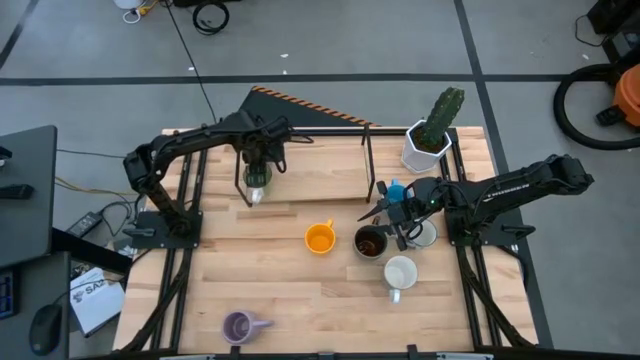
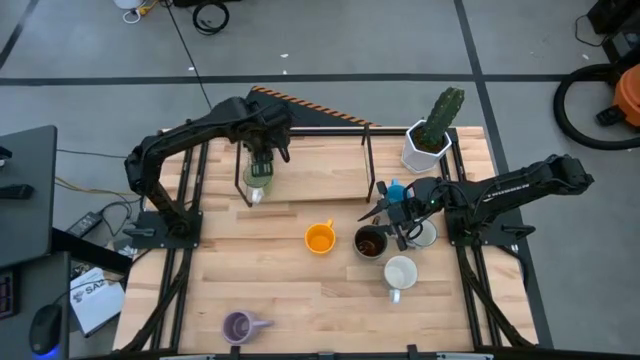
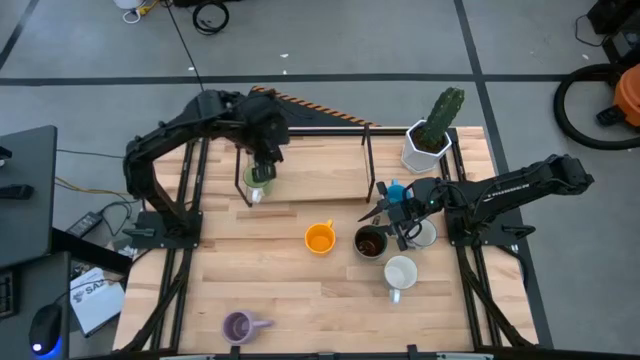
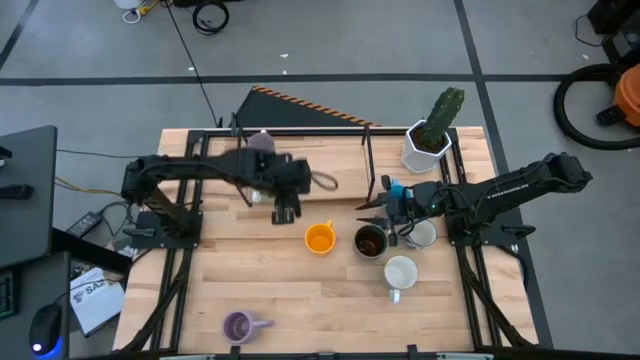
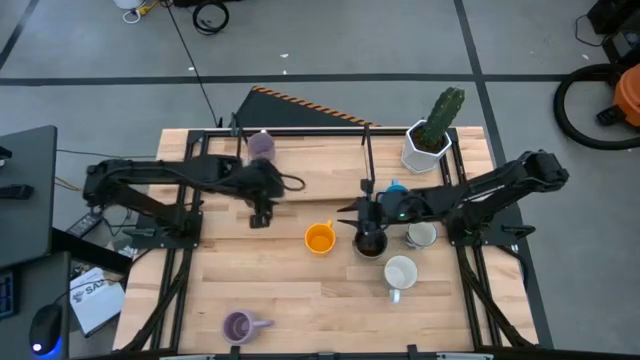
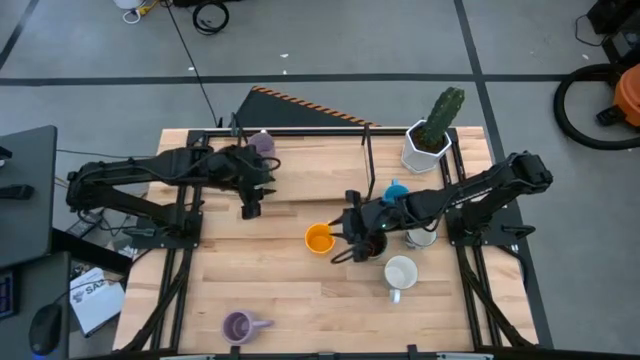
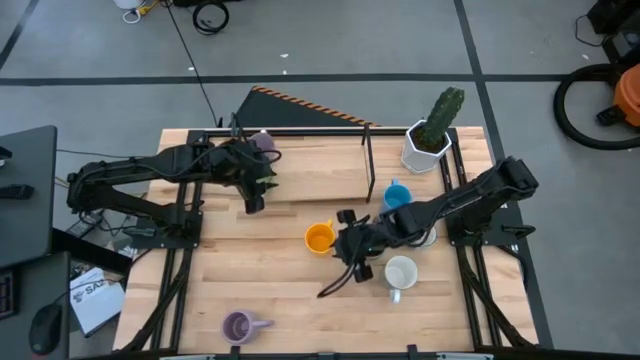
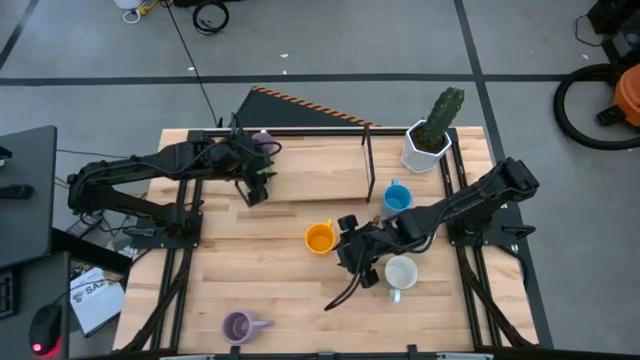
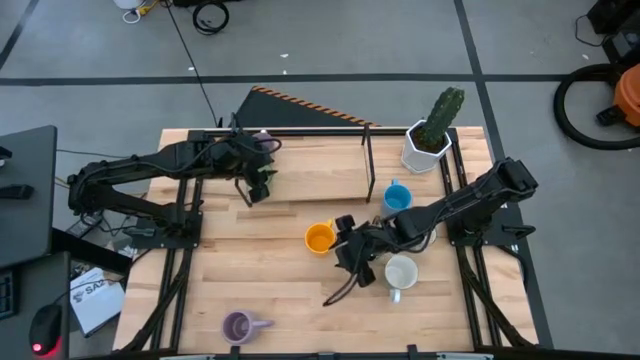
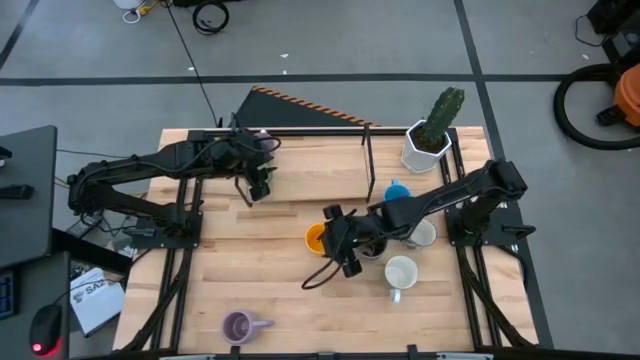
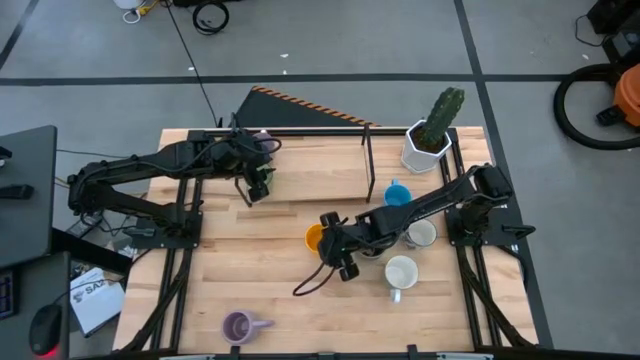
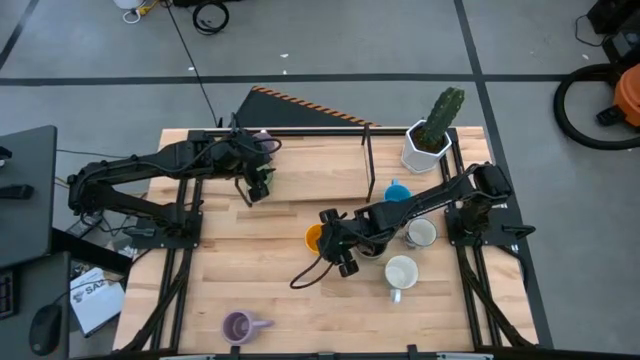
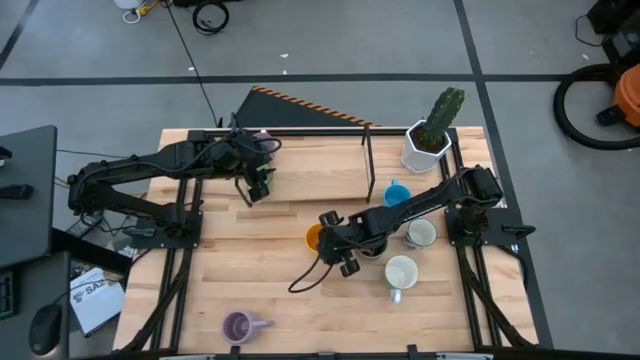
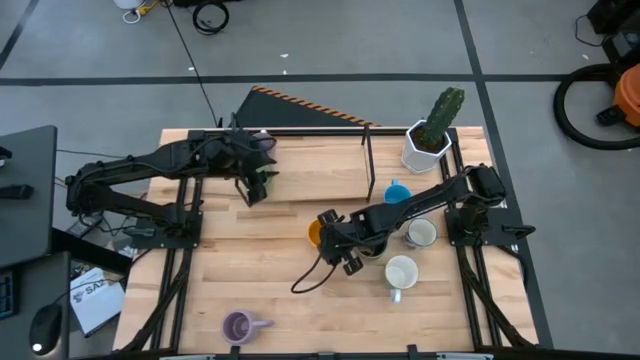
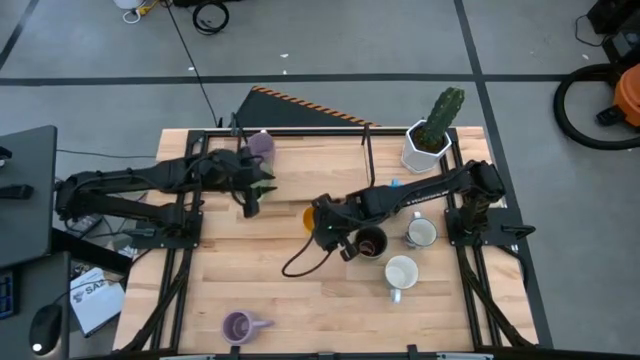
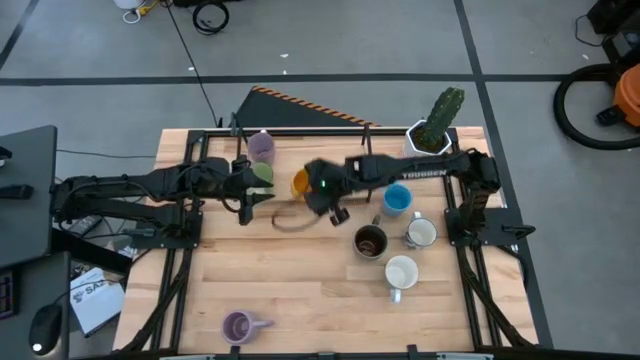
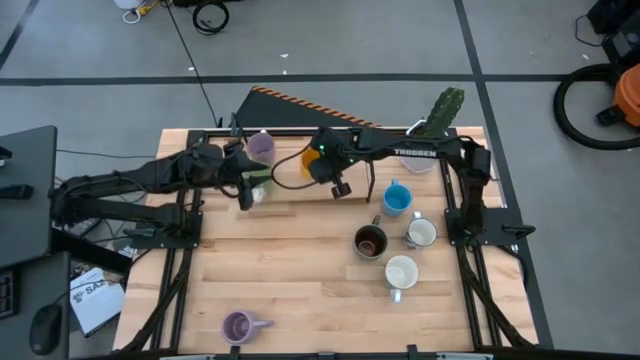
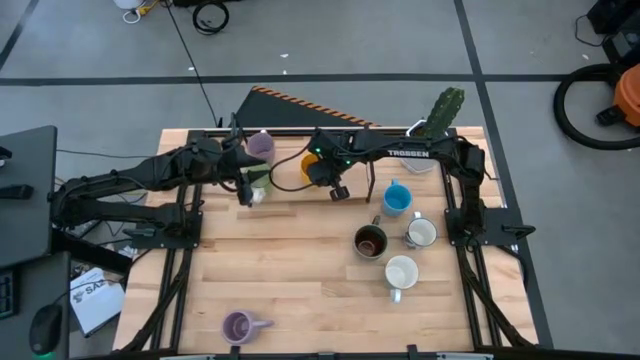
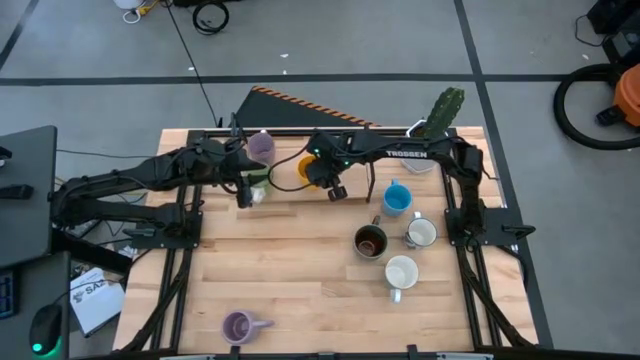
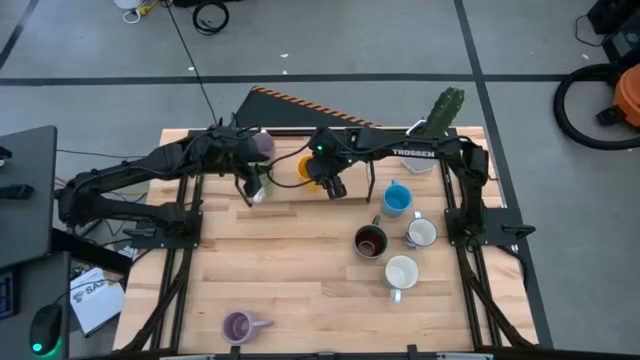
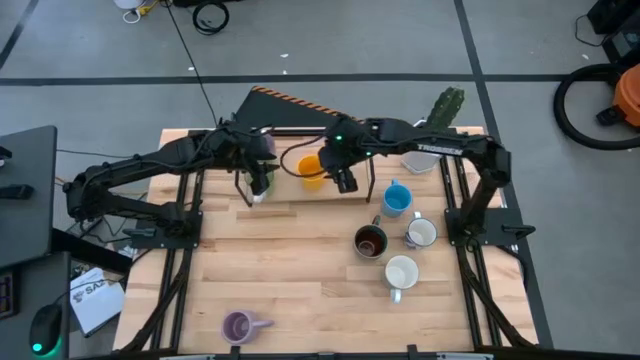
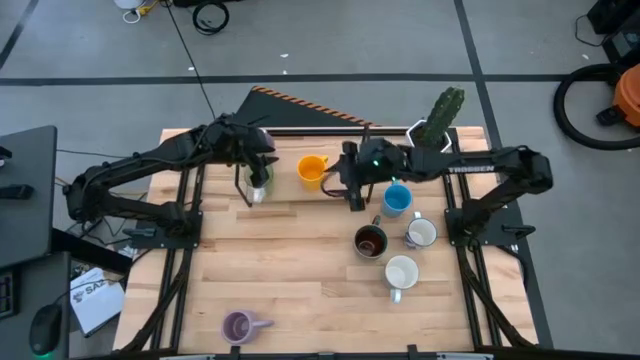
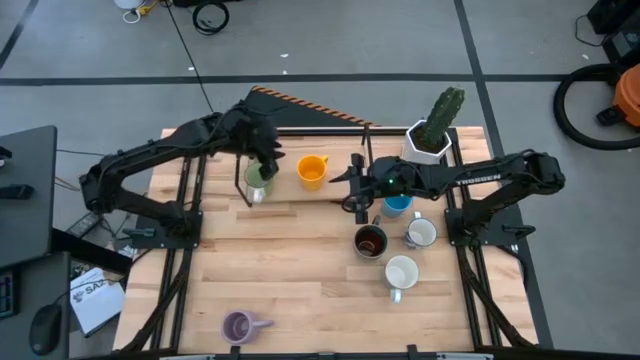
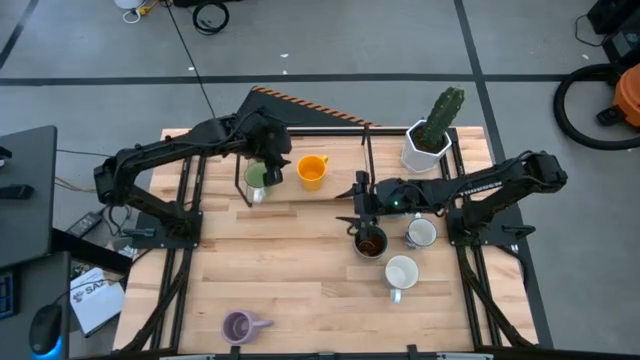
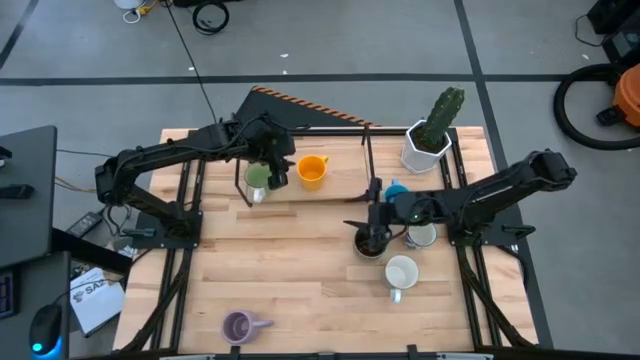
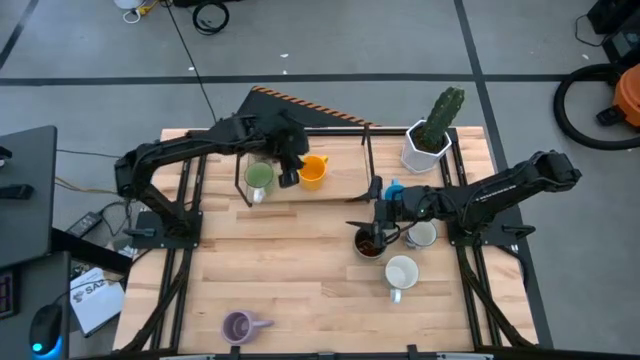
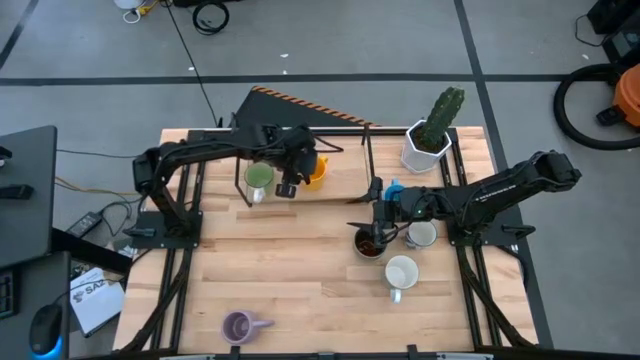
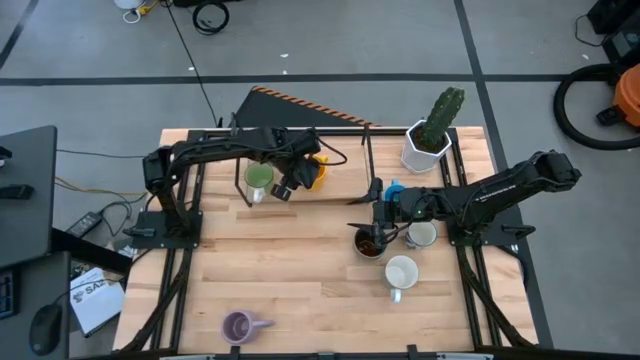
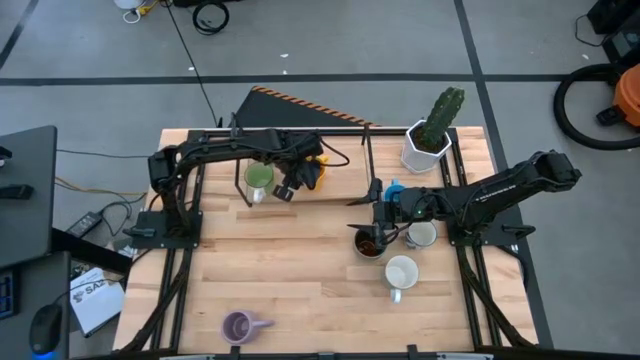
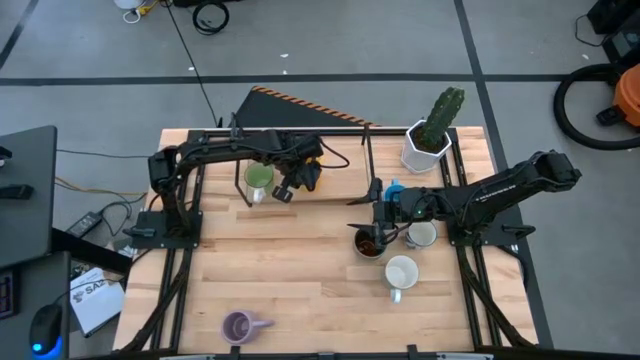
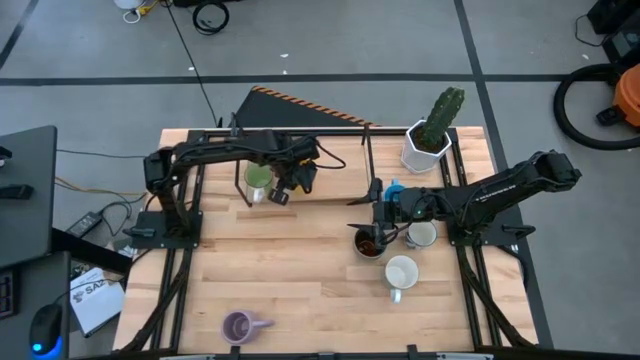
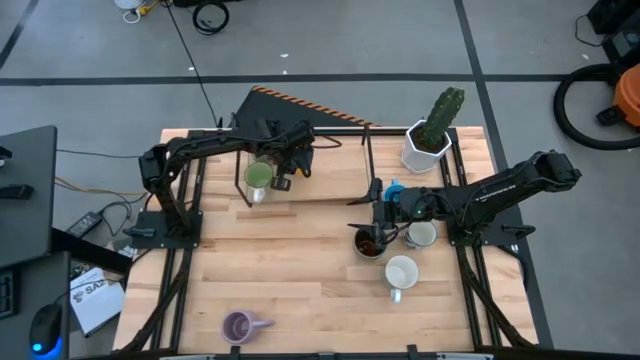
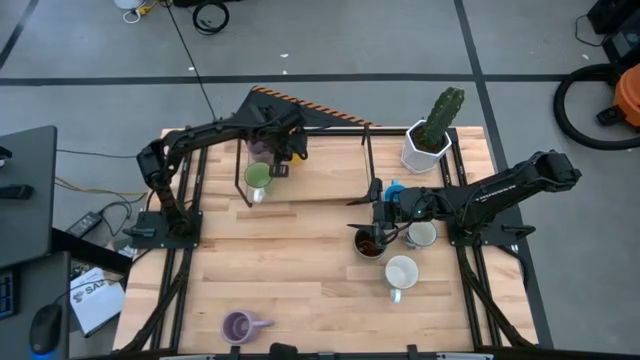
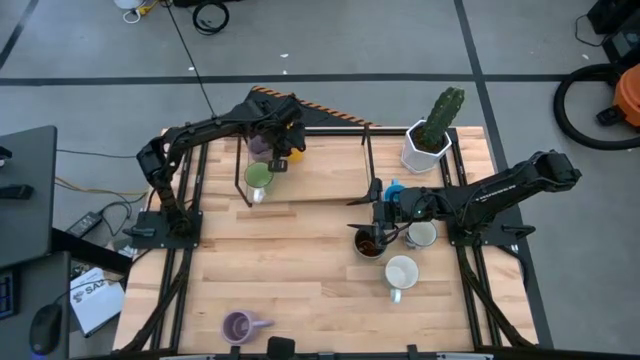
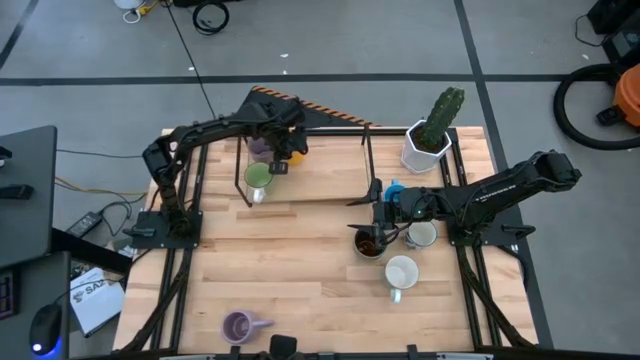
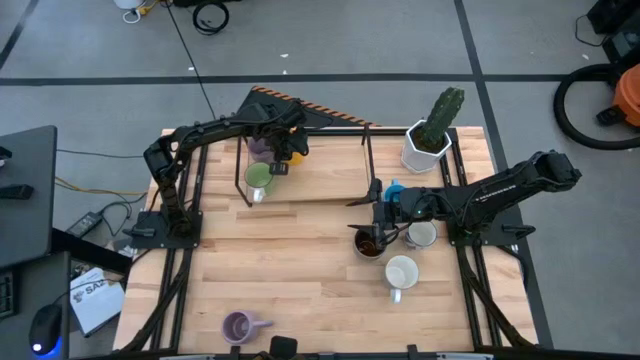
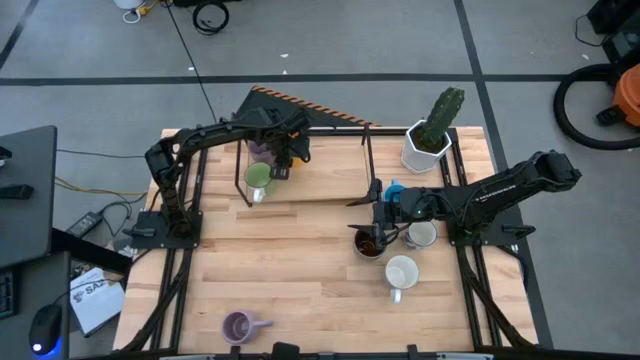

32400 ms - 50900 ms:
Task: Place coffee mugs
Put the yellow mug on the shelf
